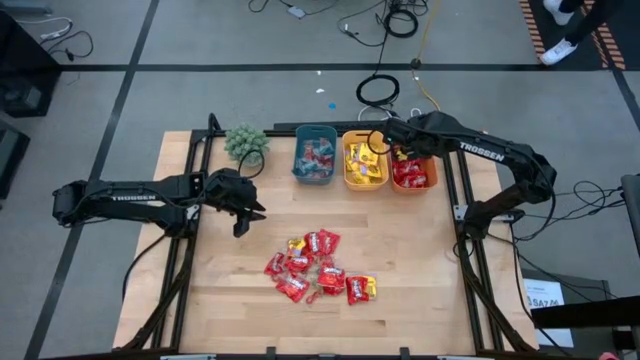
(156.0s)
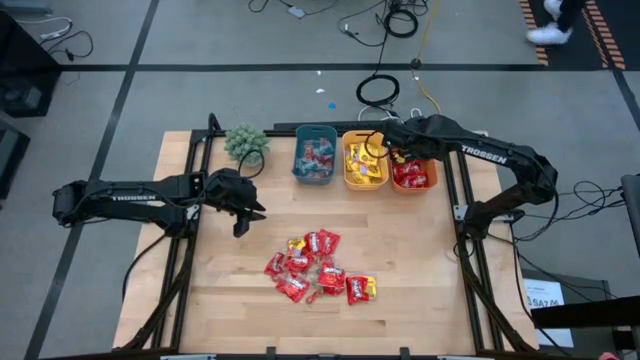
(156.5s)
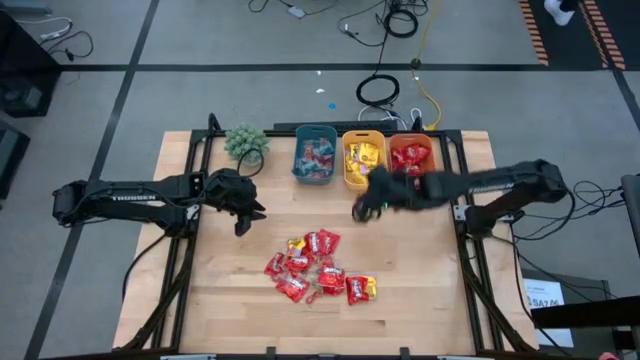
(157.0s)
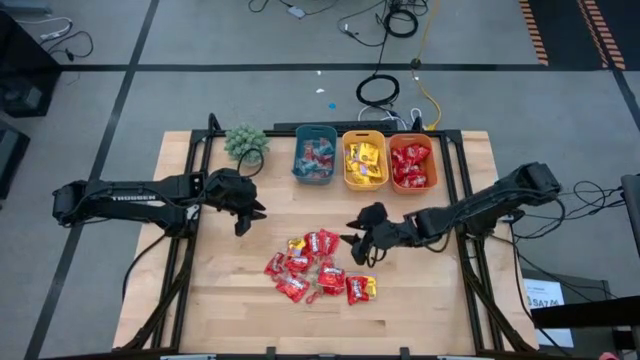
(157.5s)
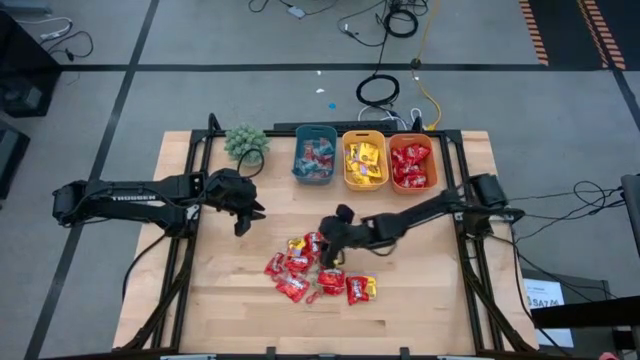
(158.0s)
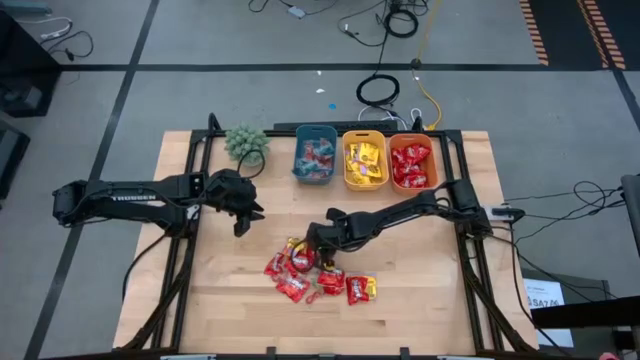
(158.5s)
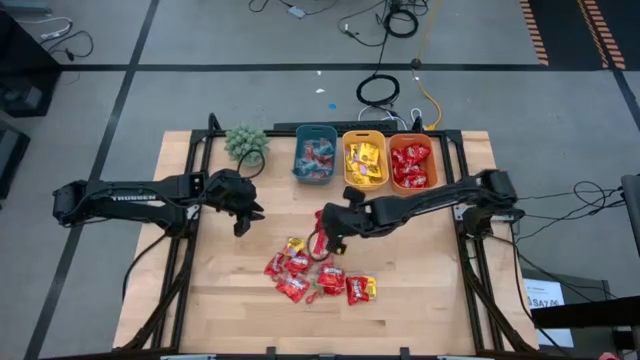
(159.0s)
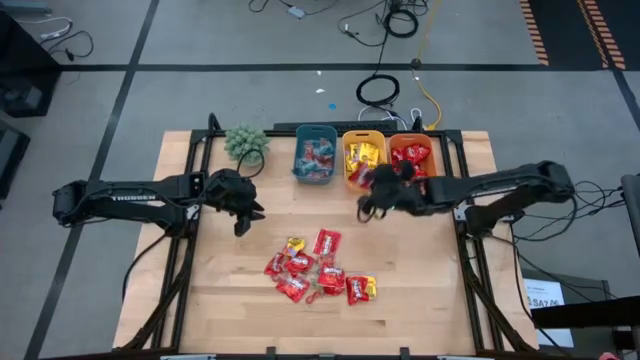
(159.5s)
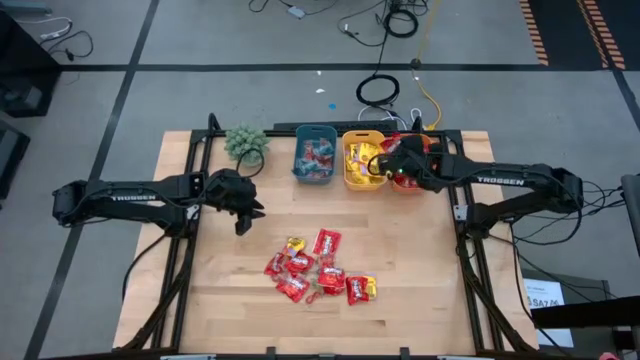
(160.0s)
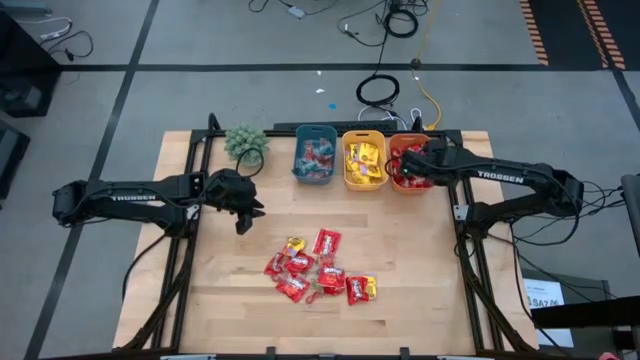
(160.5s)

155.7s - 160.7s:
Task: Sort candy
Put the red candy into the orange bin

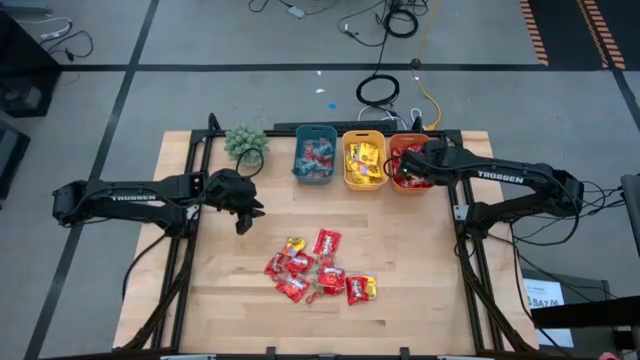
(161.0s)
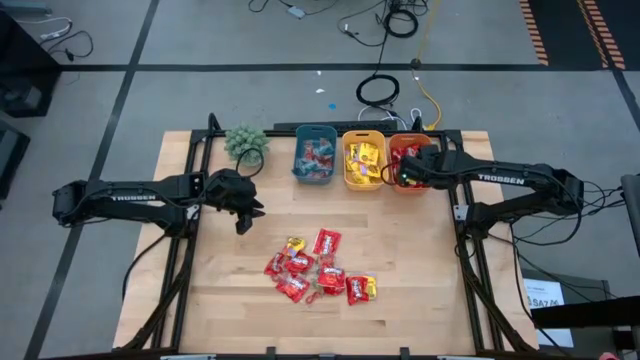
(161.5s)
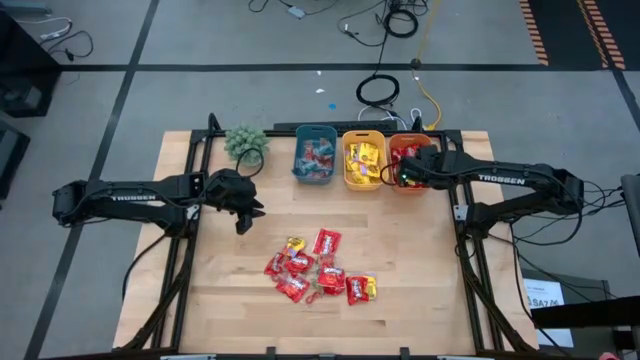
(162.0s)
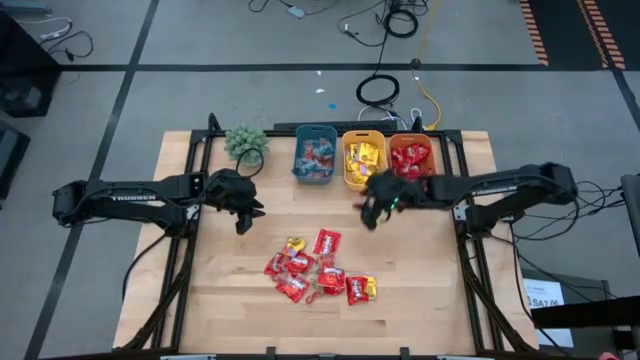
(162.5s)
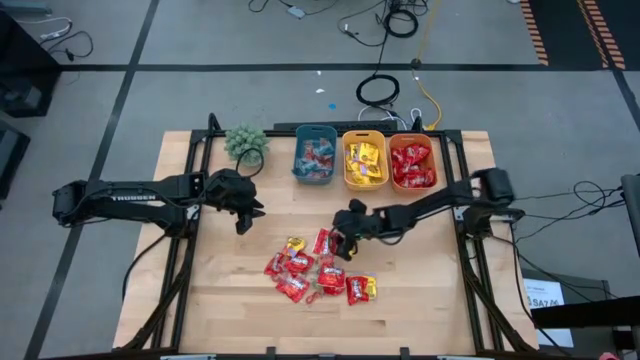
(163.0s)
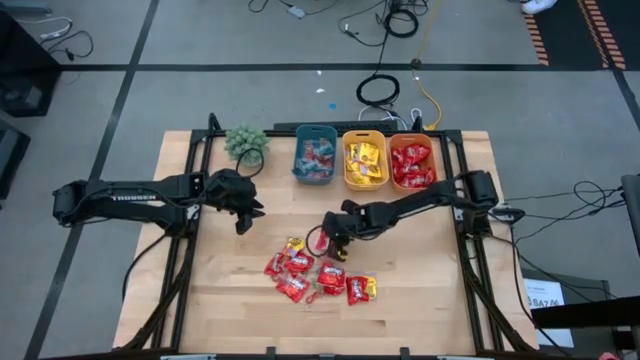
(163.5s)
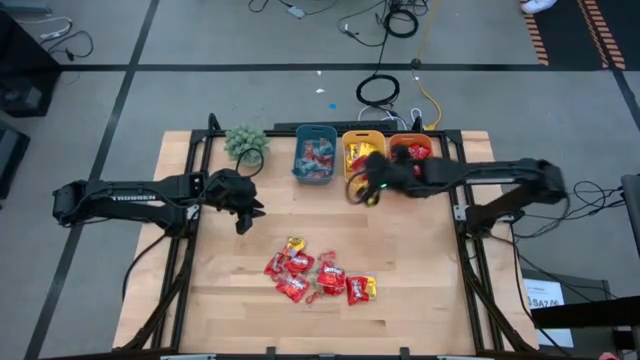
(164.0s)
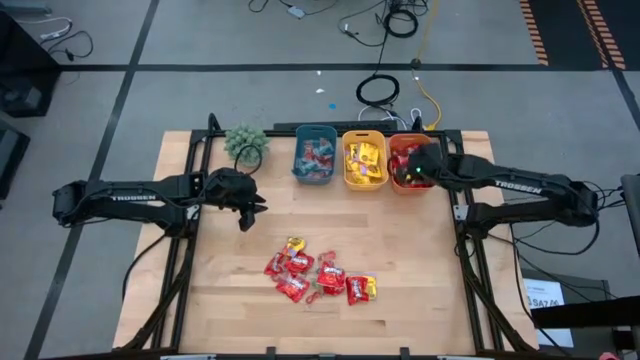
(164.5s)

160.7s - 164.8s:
Put the red candy into the orange bin

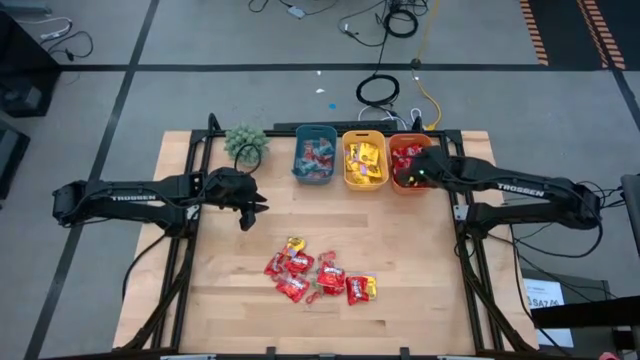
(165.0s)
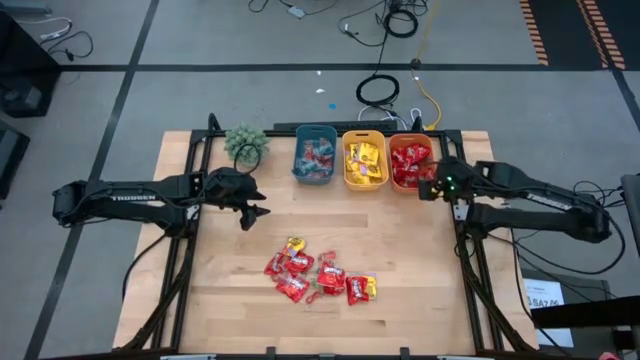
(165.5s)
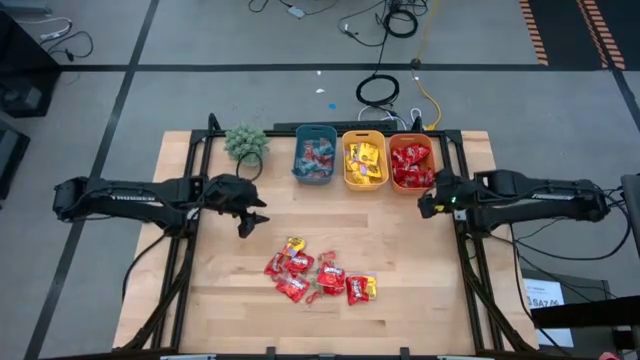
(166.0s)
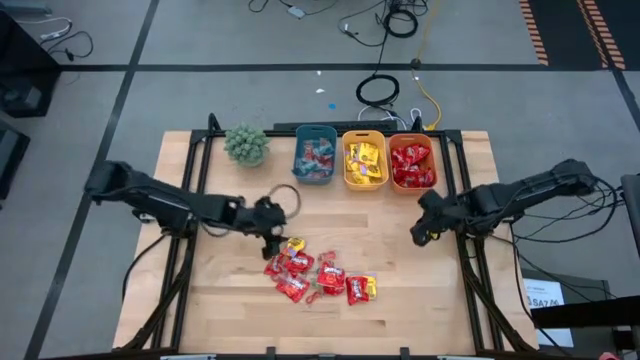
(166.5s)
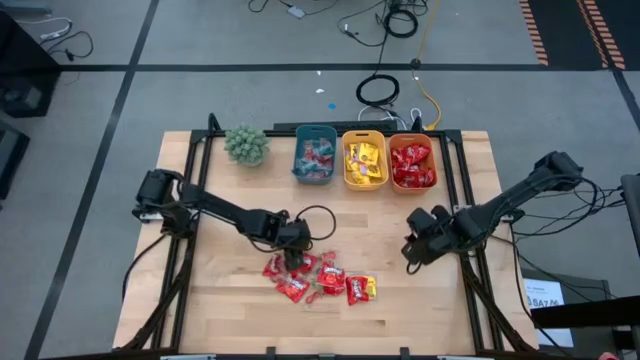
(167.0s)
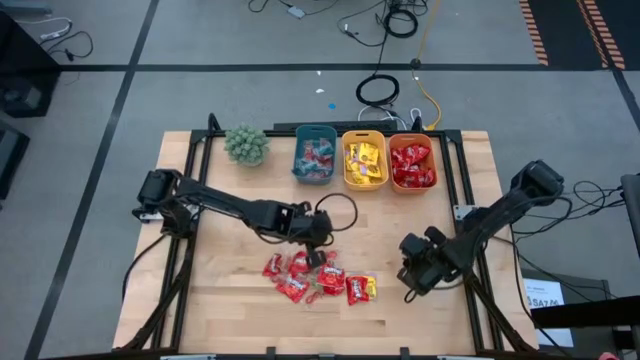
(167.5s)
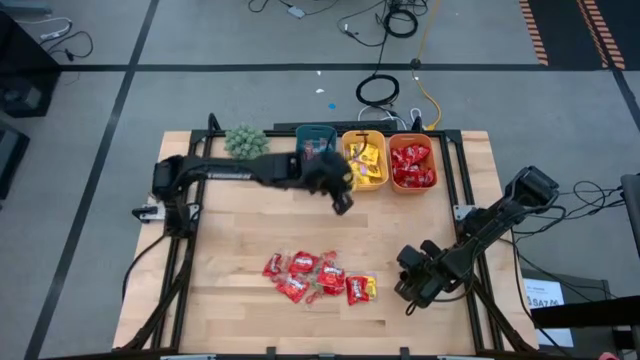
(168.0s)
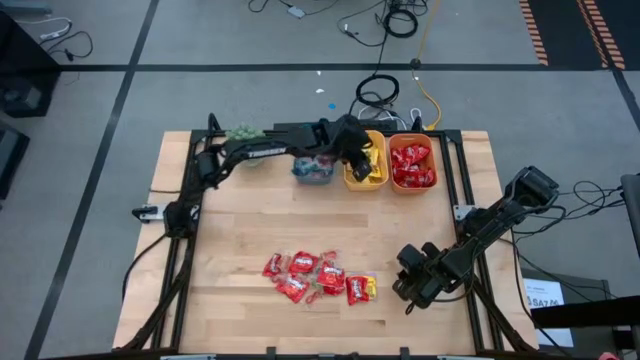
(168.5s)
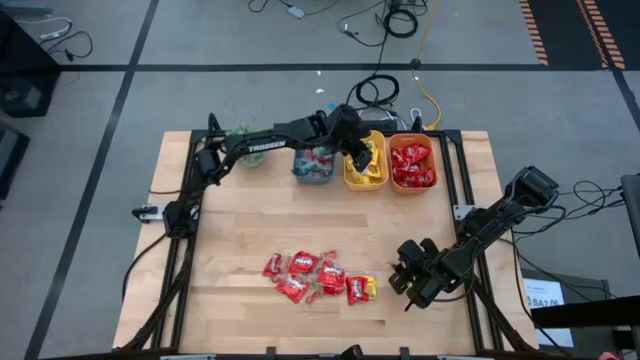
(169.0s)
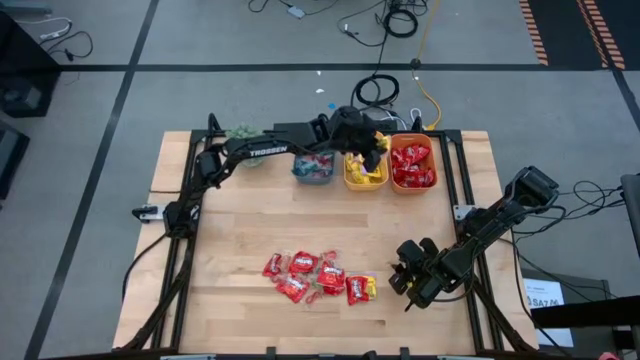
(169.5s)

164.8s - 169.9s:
Put the yellow candy into the yellow bin

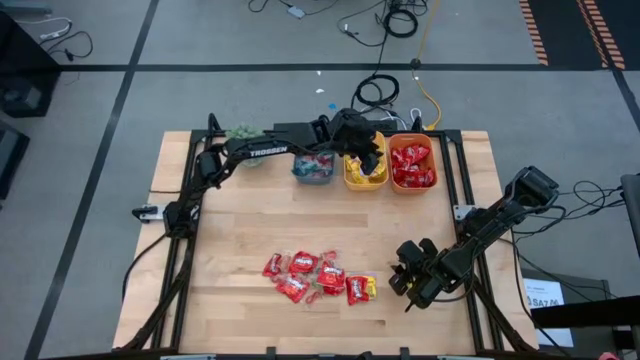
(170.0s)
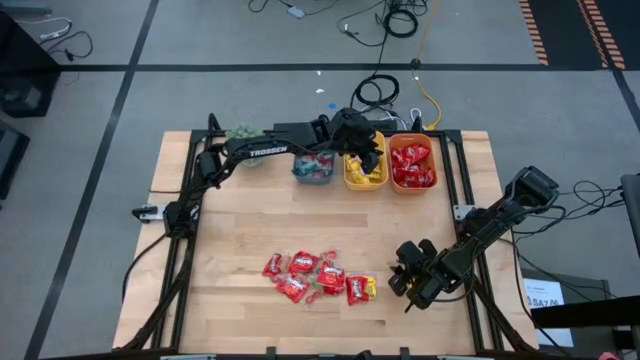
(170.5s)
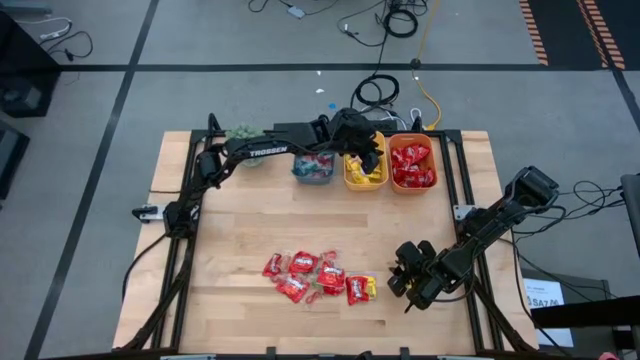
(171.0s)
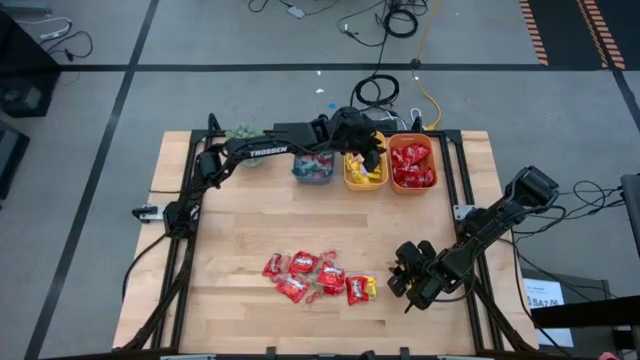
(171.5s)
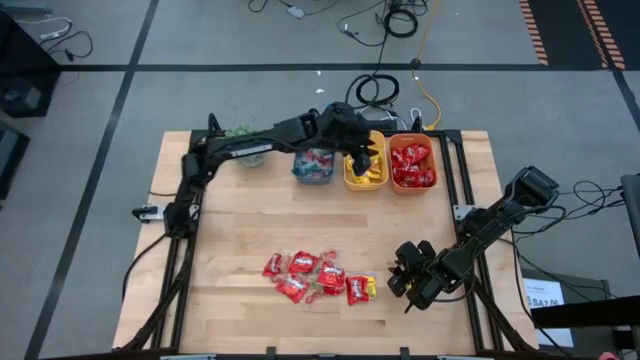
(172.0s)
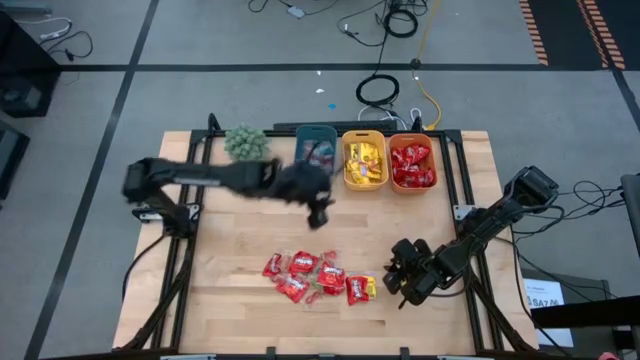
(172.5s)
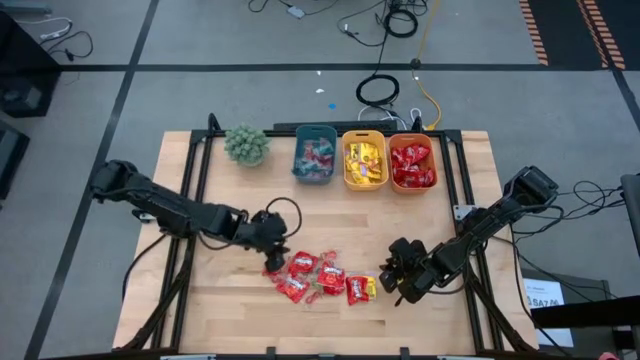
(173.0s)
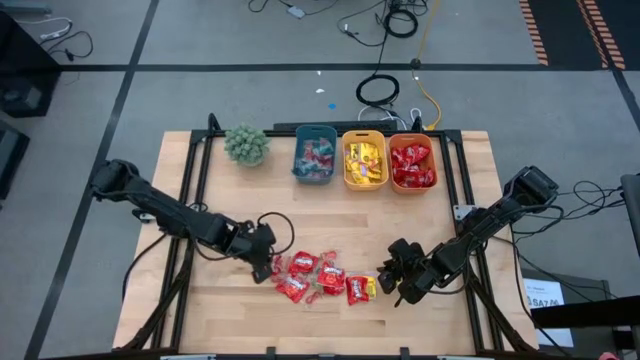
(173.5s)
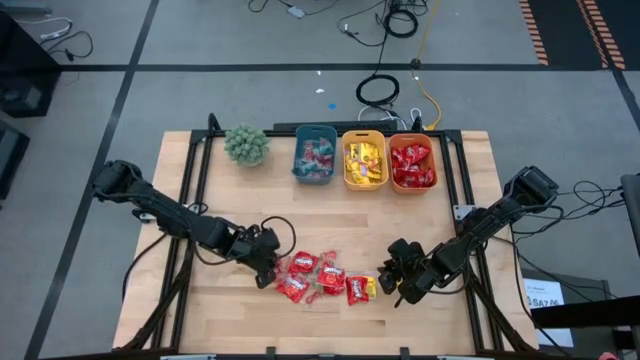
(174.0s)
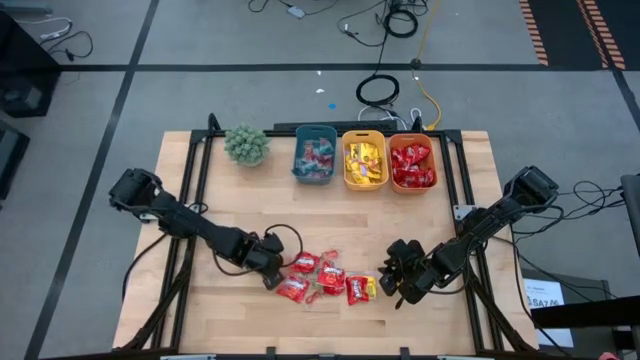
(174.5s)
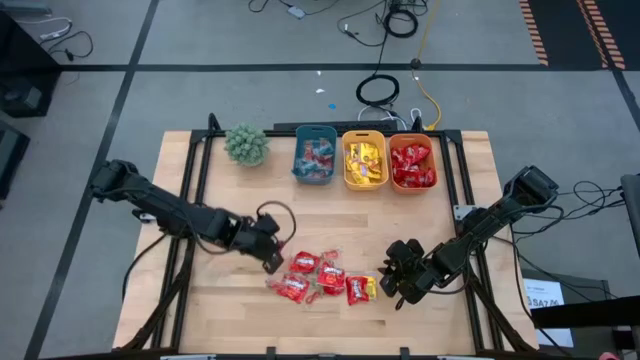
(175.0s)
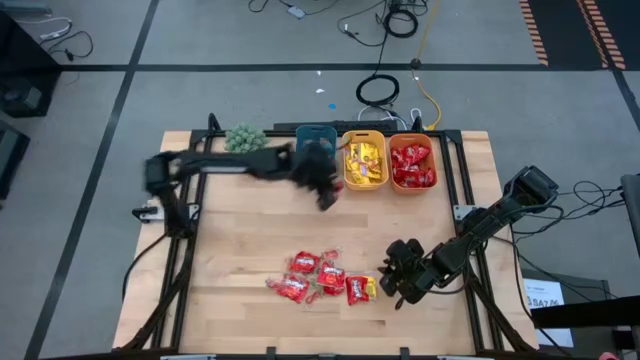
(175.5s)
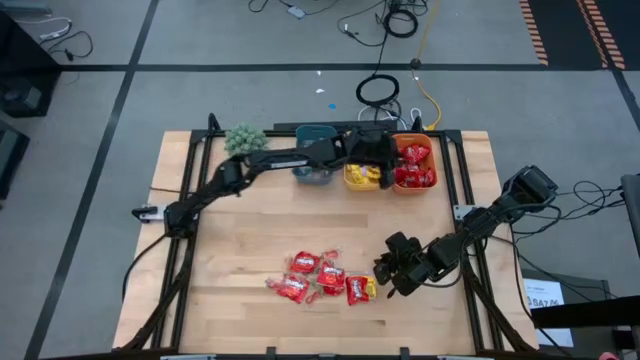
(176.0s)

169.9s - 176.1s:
Put the red candy into the orange bin
